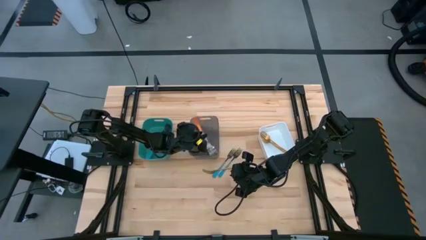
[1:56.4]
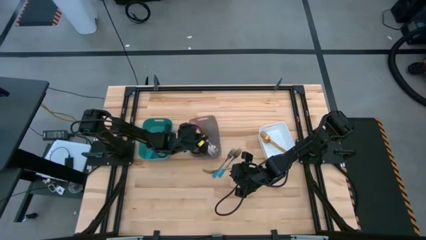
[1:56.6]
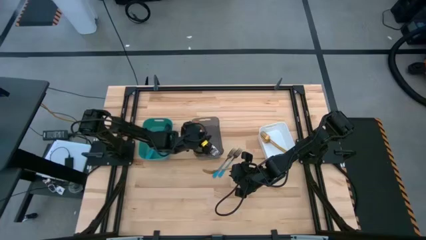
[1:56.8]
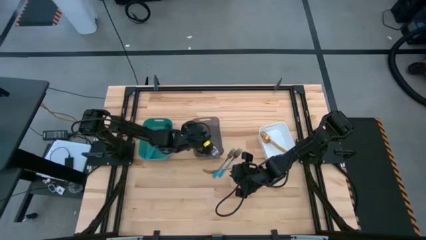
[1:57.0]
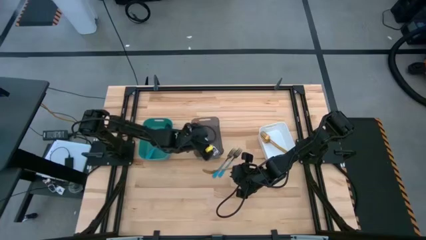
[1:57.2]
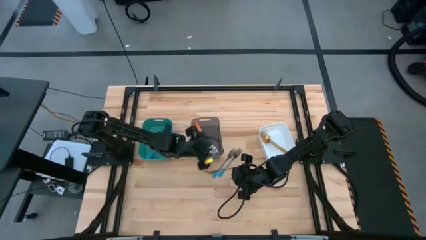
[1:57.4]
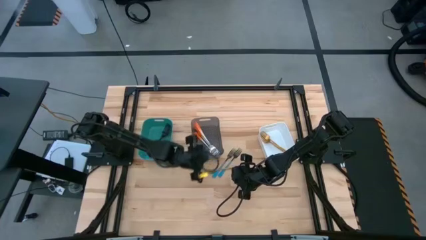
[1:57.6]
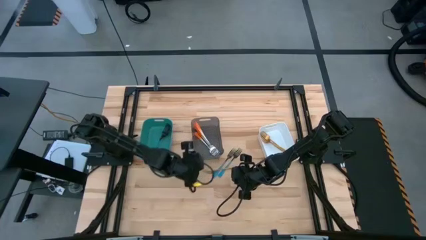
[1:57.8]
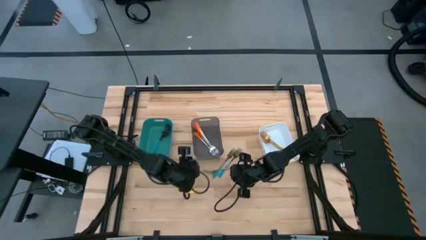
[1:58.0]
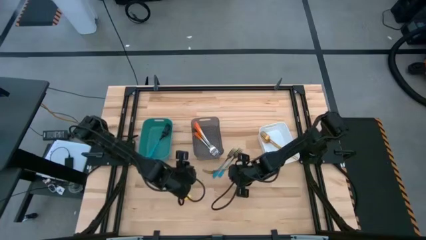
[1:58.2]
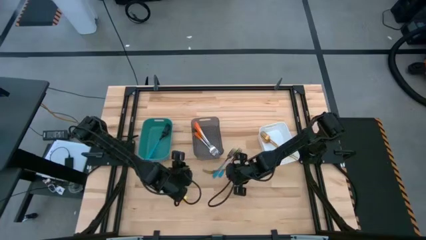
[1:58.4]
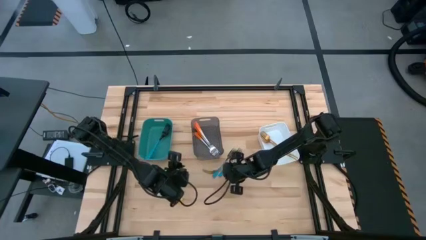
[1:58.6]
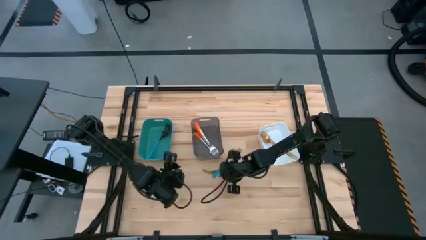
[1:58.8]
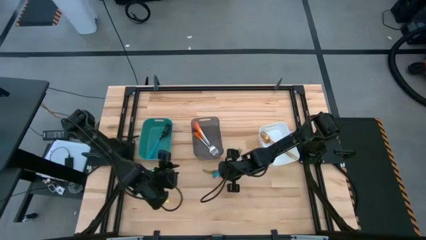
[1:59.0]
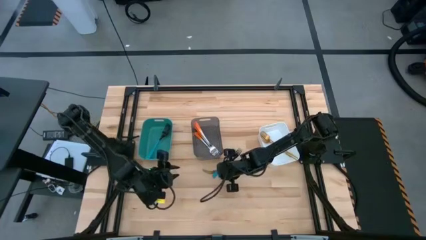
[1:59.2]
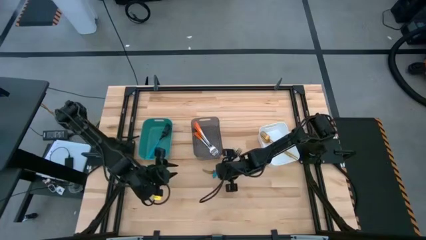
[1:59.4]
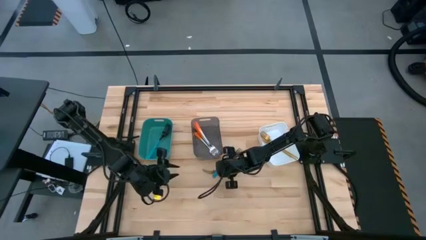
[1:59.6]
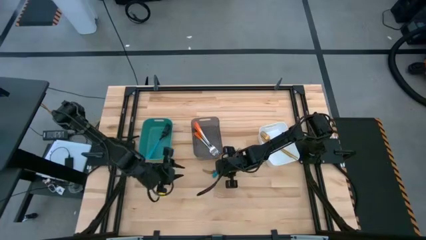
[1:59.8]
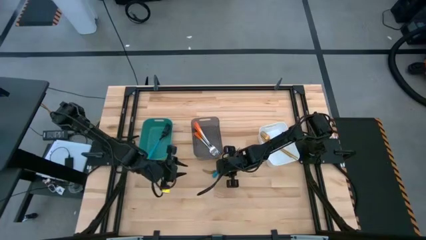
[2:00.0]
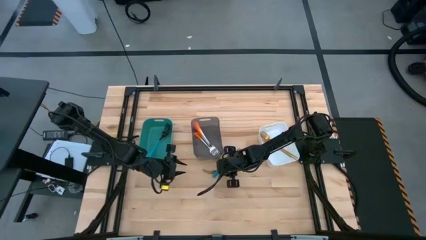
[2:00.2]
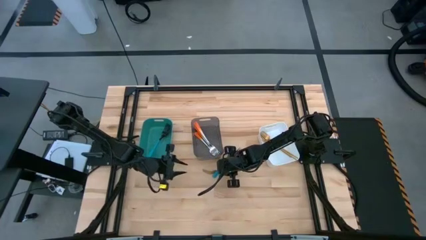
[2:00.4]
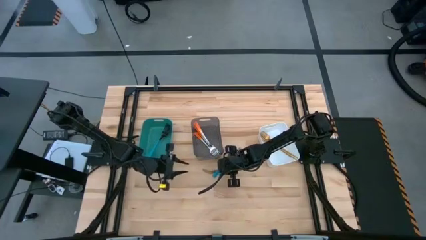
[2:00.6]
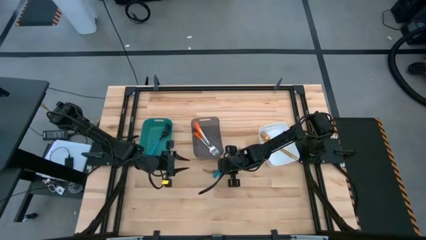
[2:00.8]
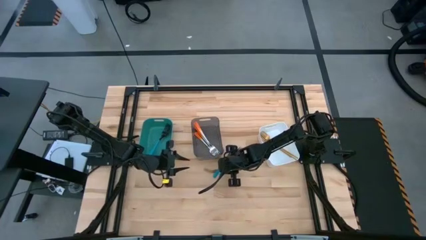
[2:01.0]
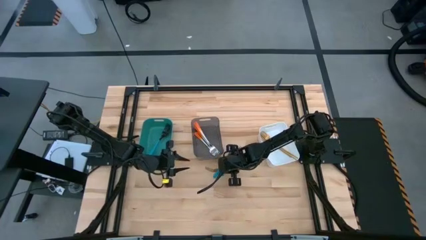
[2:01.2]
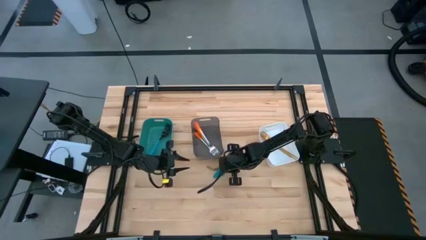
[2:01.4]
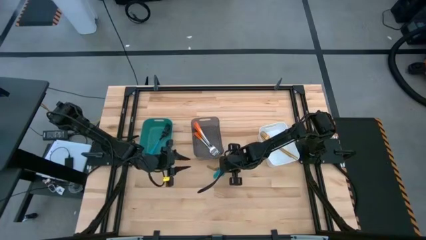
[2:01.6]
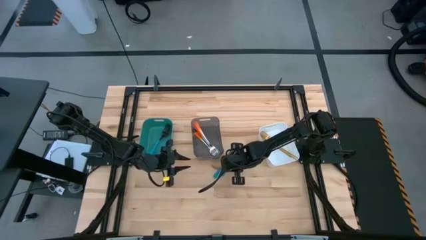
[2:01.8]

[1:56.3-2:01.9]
Task: Sort silverware by color (type)
Put the gold fork into the white bin

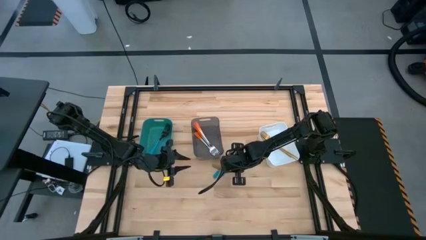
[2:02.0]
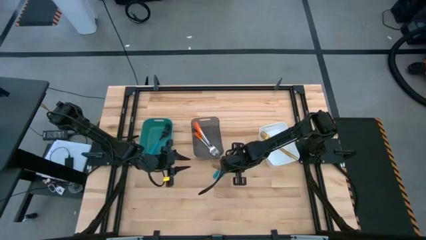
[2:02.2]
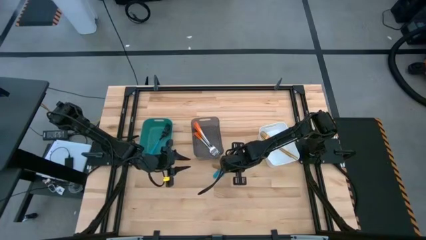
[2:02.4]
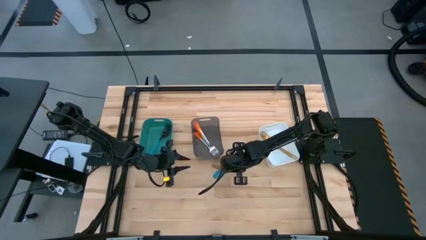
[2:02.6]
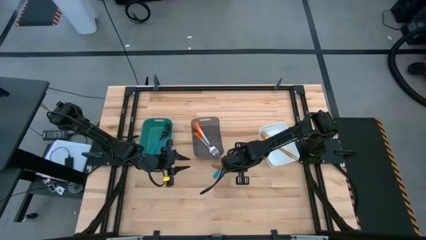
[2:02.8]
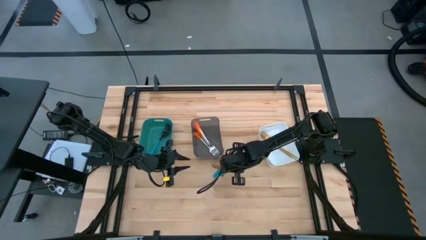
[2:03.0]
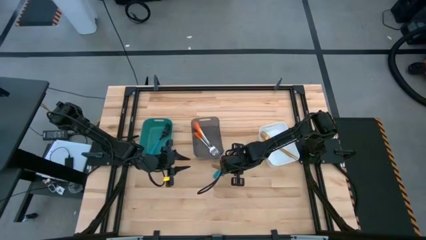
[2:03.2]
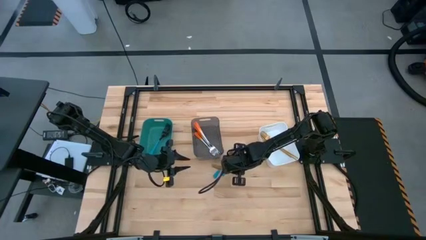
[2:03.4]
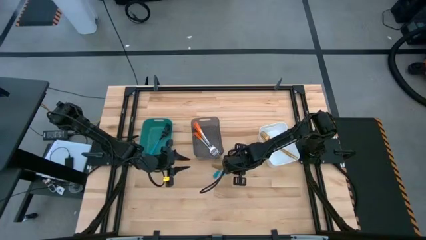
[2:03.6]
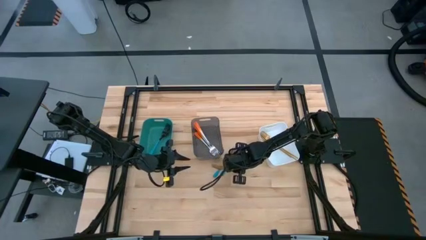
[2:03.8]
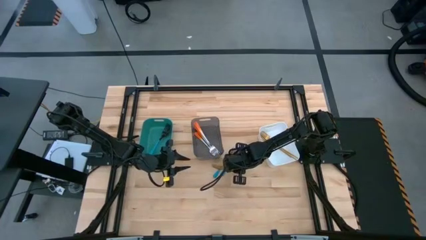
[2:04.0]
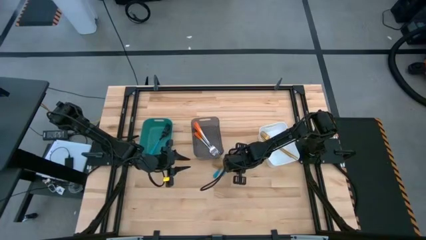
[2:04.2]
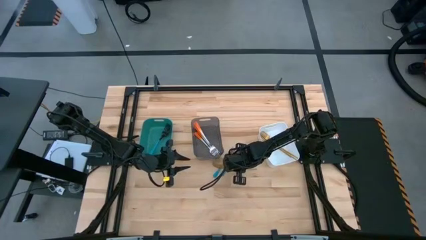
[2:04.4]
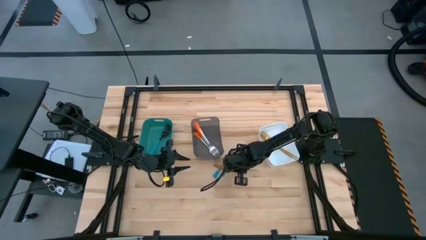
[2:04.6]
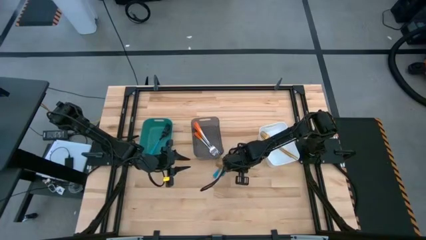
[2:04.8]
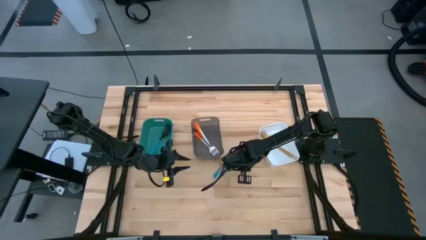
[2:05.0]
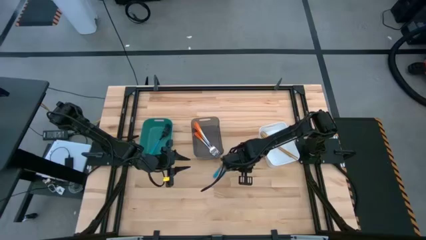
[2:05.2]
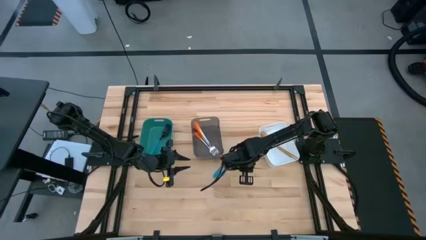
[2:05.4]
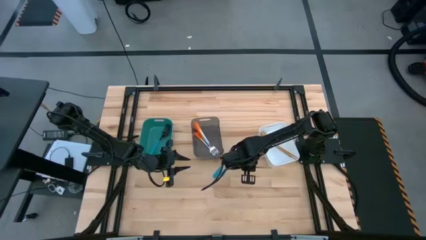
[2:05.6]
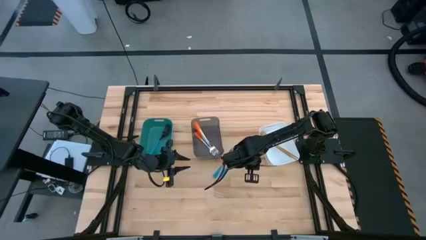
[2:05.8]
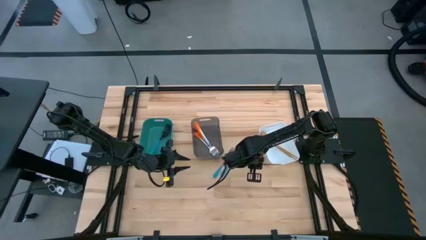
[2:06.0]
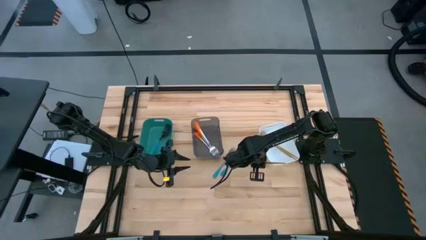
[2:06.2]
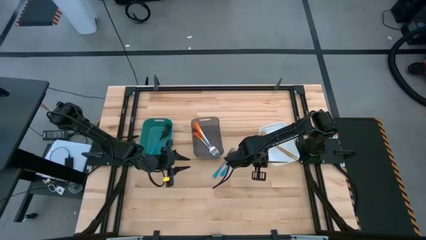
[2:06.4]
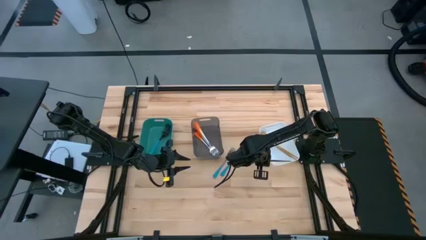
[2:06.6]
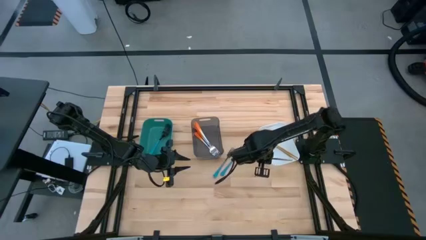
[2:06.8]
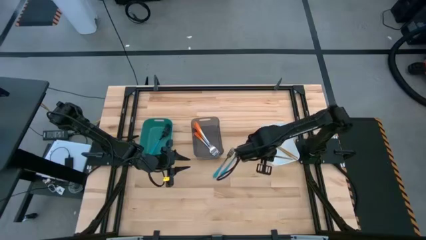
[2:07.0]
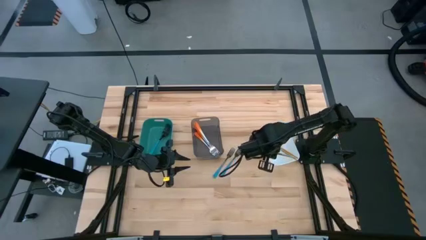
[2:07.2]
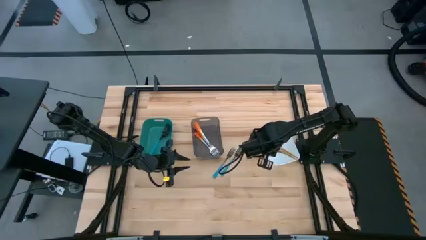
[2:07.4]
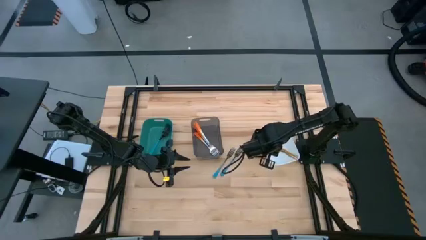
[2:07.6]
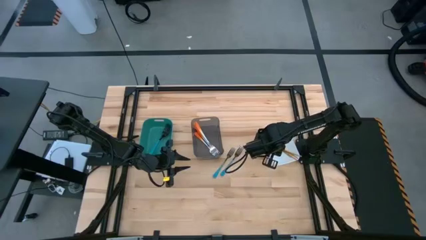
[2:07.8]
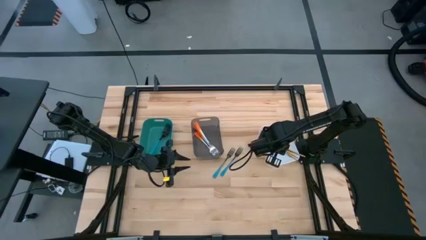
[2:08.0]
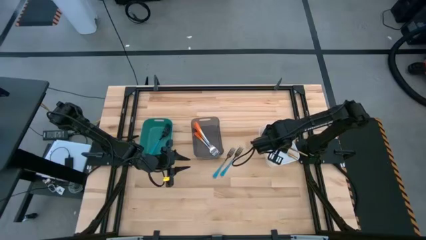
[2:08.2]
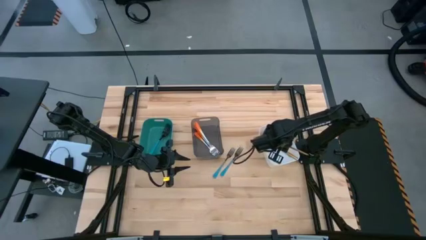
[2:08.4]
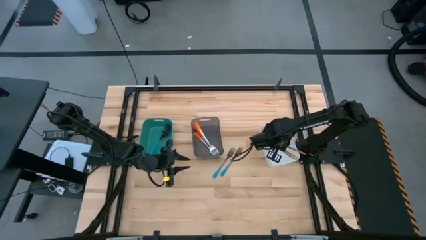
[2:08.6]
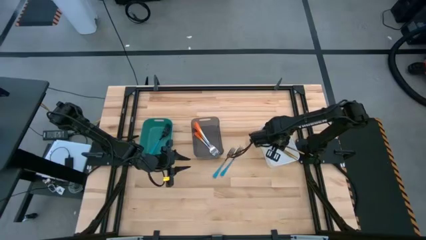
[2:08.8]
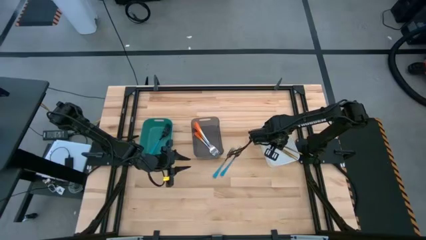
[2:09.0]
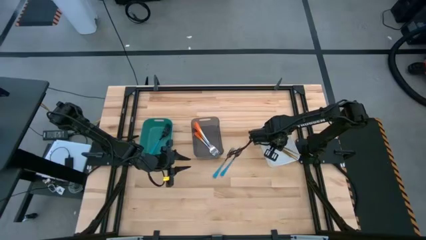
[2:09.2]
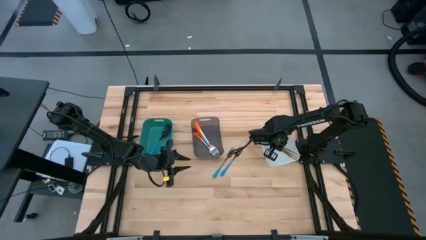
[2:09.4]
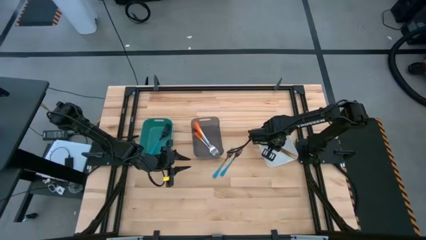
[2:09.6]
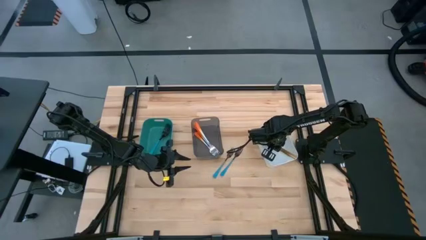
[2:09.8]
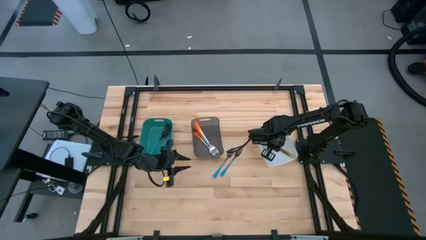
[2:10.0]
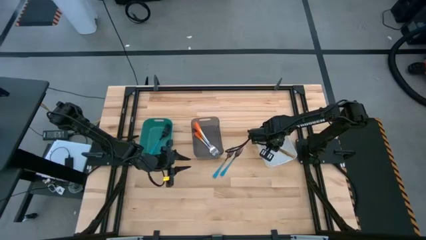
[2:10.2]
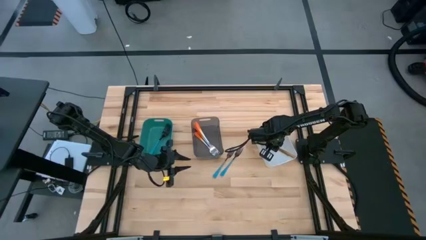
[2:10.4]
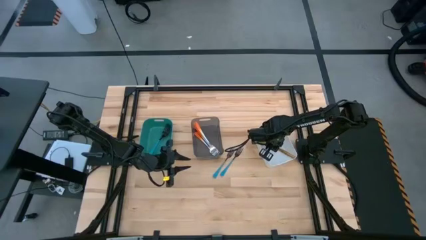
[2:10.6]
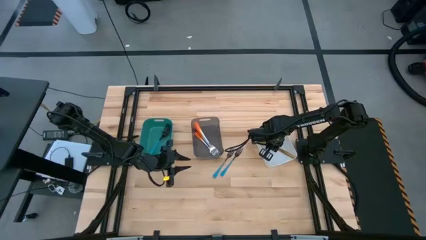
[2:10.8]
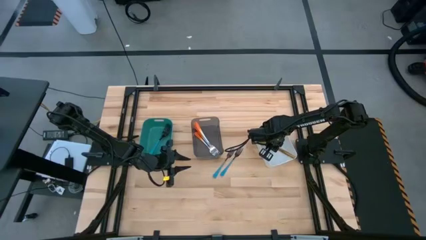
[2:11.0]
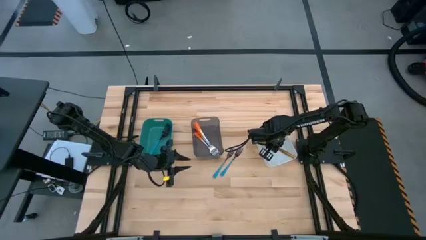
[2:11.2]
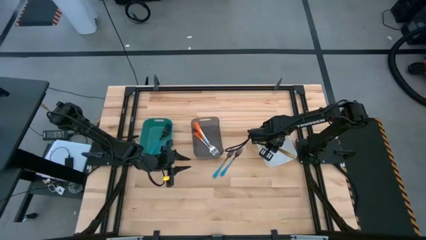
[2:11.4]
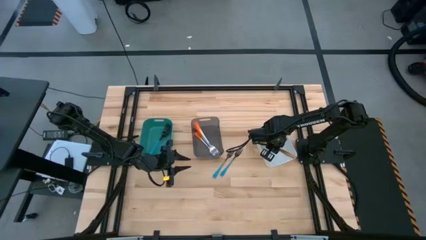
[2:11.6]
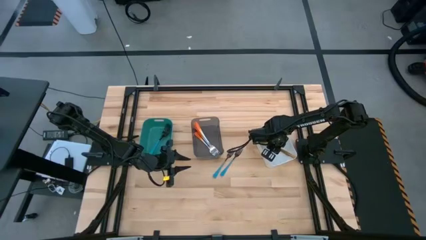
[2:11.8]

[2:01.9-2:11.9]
Put the gold fork into the white bin

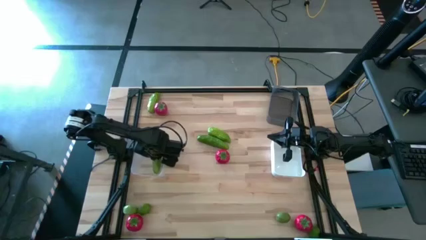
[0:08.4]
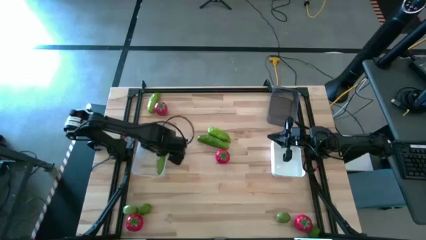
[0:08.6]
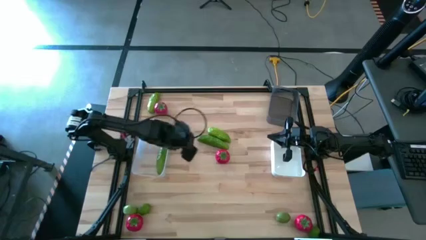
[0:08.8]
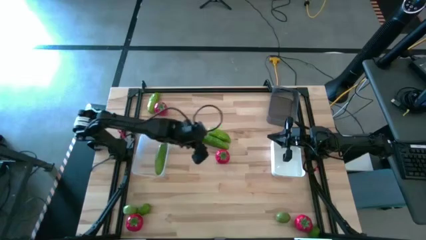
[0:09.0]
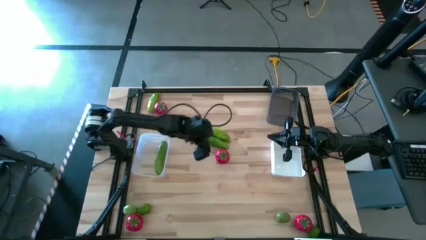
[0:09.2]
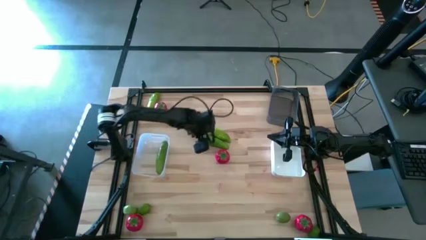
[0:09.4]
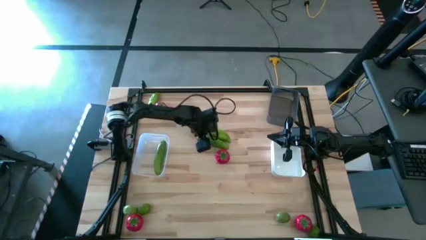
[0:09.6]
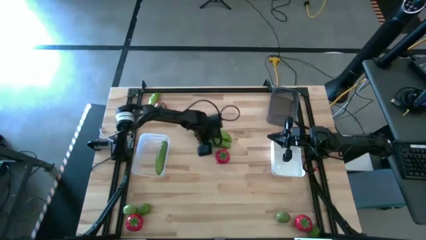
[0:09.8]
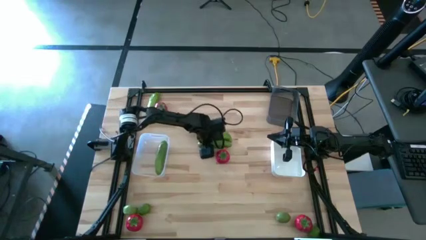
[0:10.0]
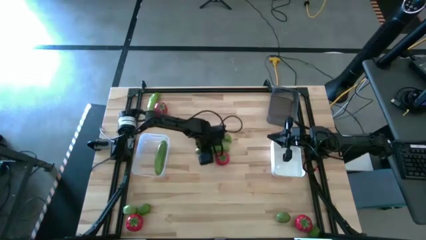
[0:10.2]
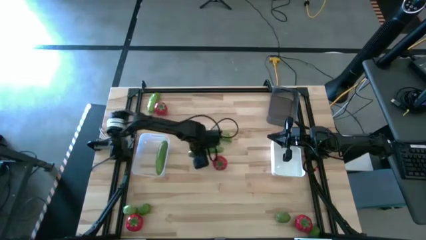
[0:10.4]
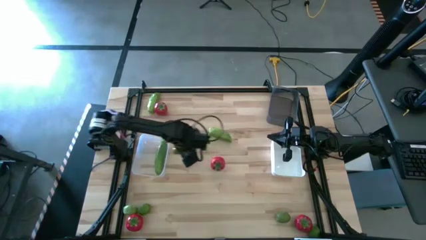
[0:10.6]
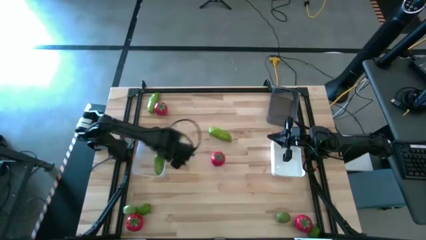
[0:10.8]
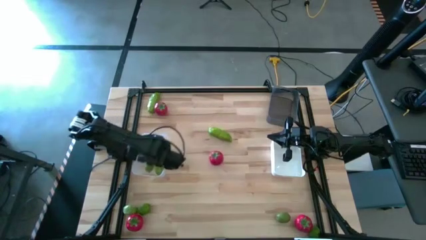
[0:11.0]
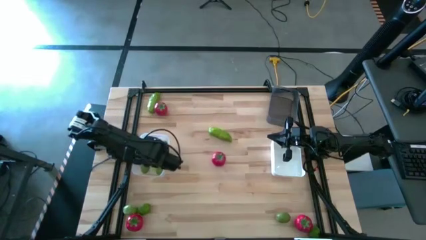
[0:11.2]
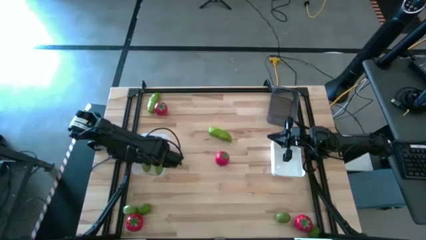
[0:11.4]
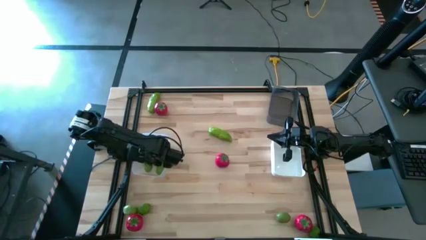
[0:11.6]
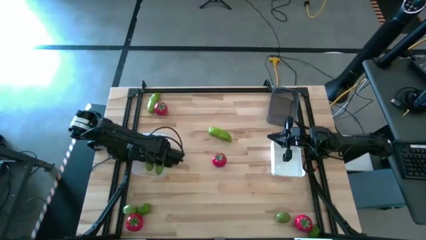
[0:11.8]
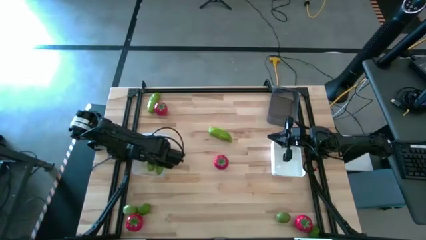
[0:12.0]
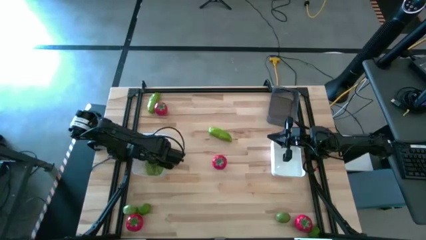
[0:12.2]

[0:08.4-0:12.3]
Task: Sort produce into baskets
Put the cucumber into the transparent bin
